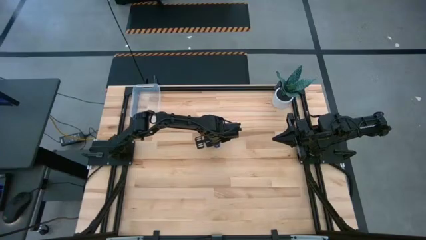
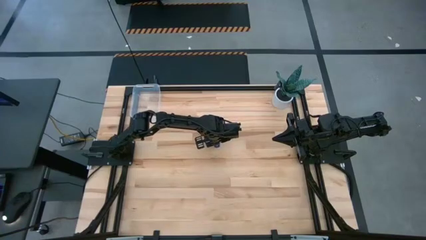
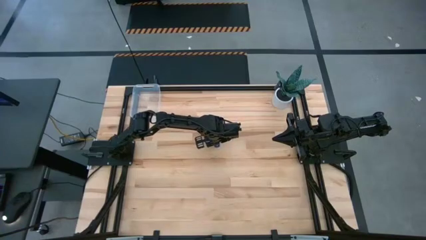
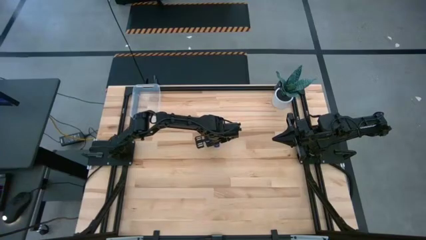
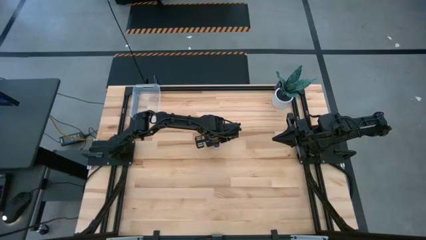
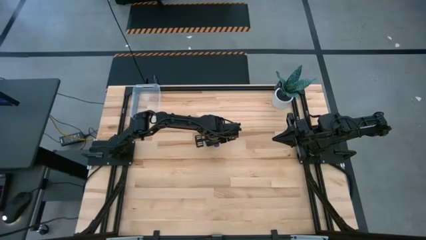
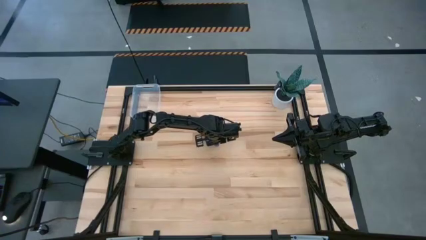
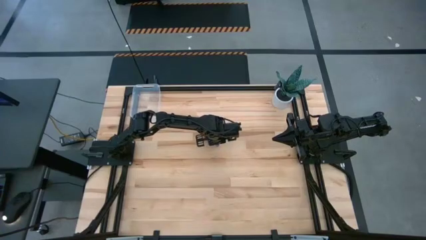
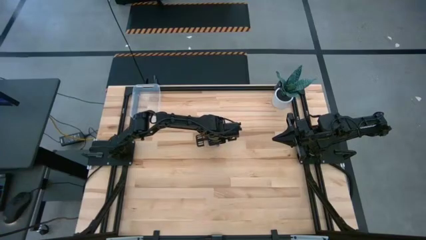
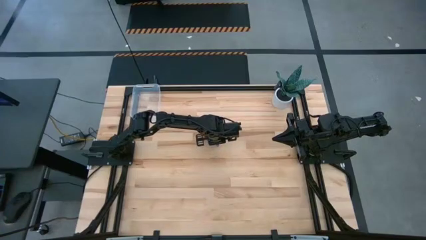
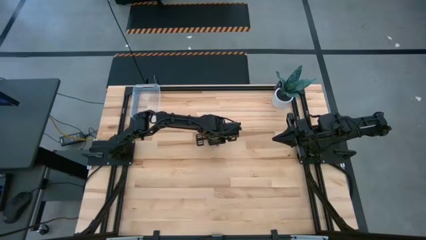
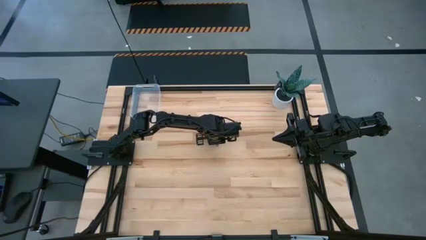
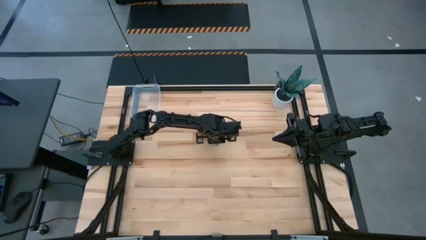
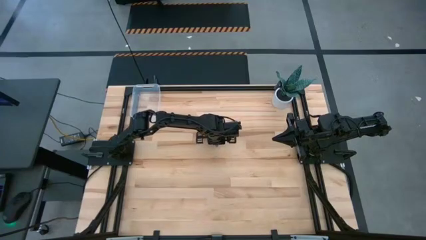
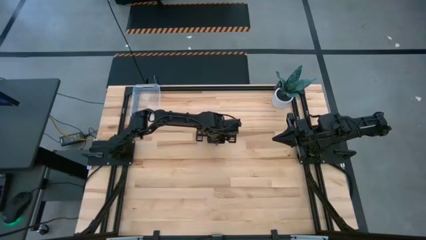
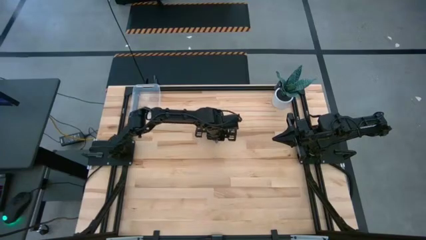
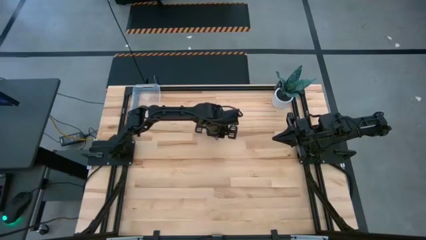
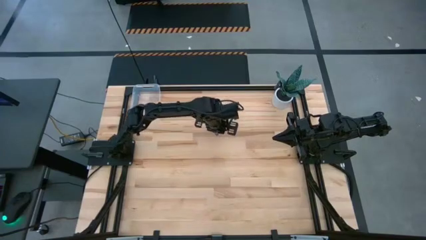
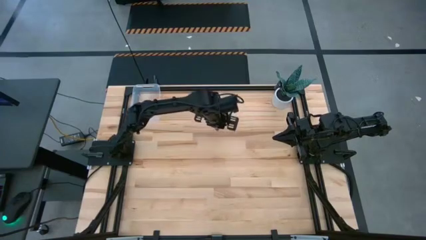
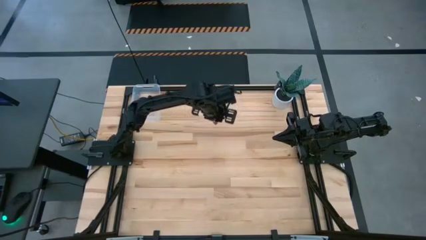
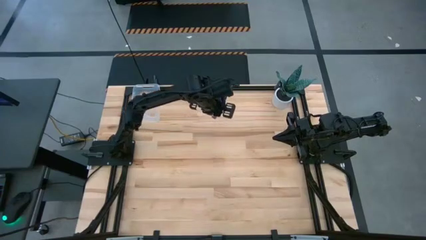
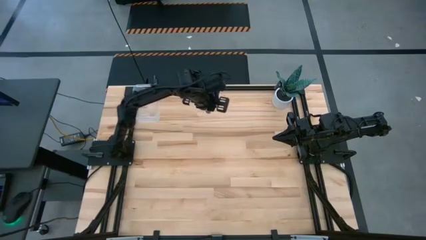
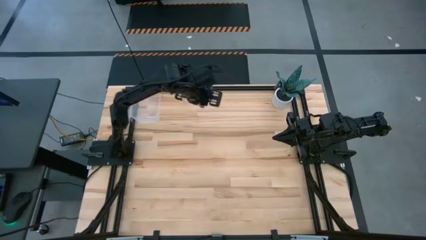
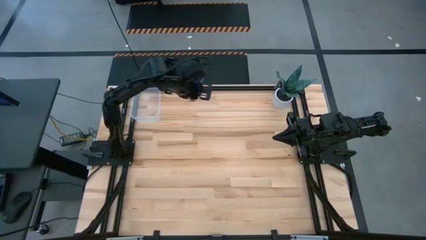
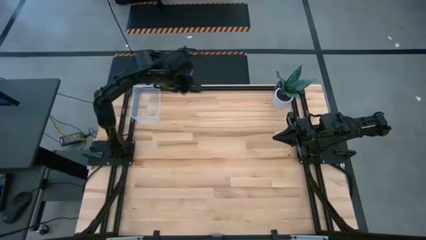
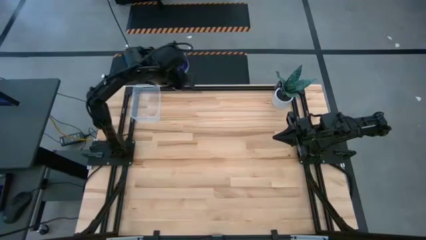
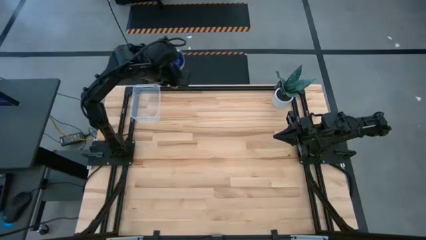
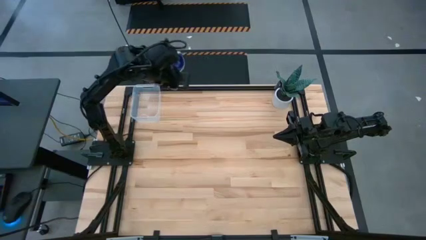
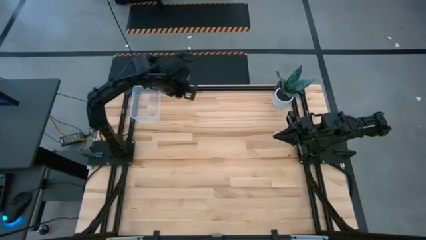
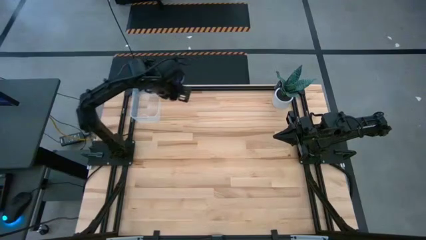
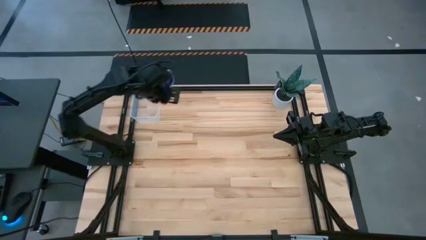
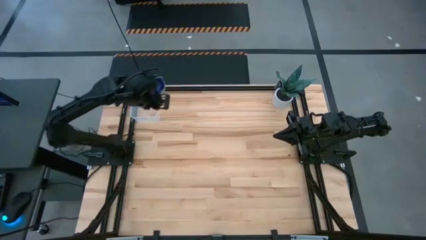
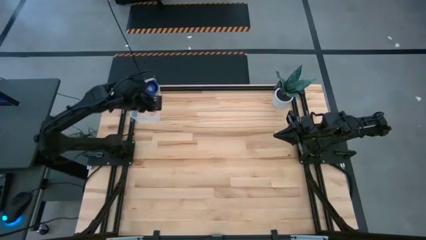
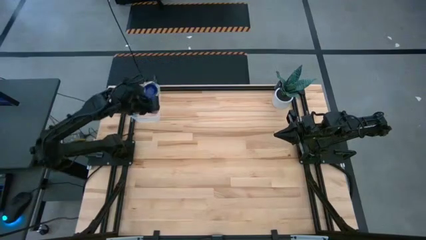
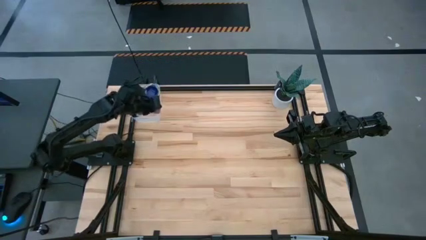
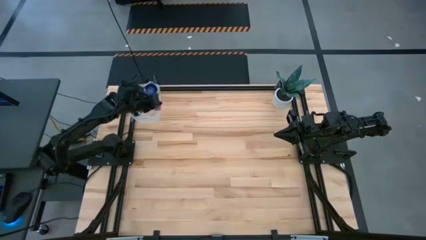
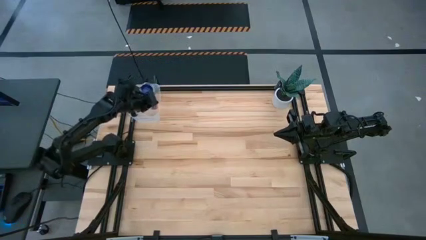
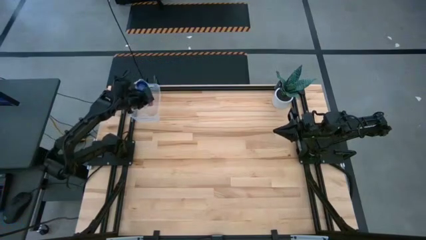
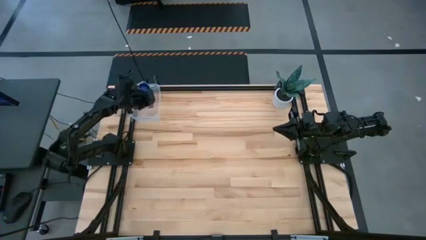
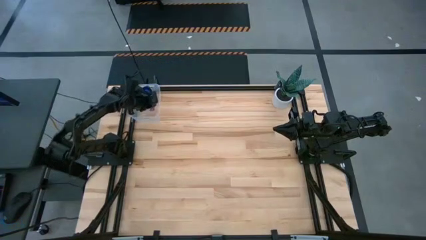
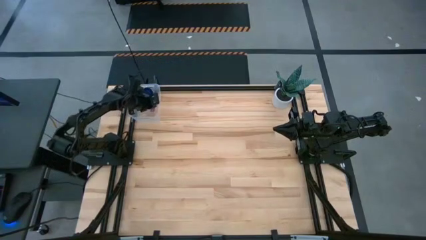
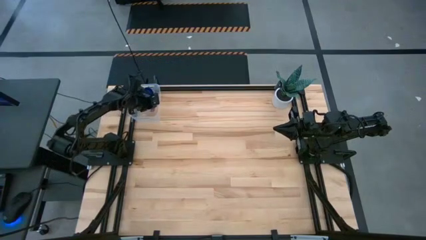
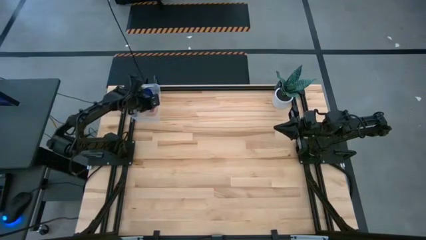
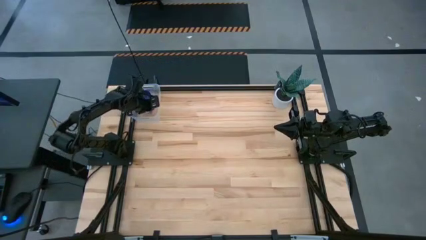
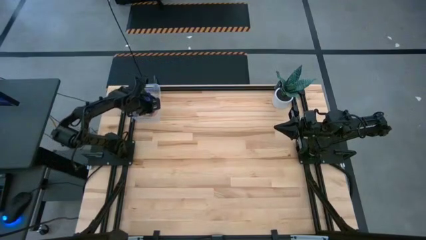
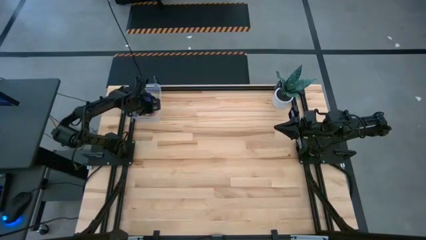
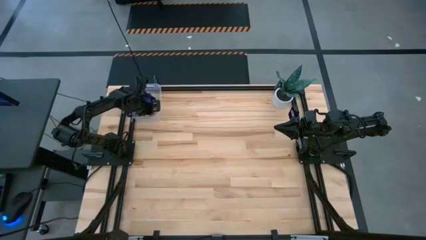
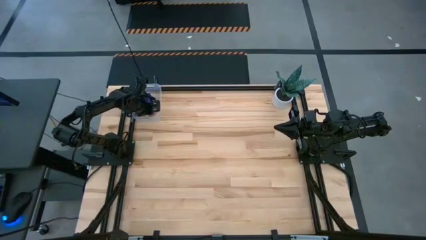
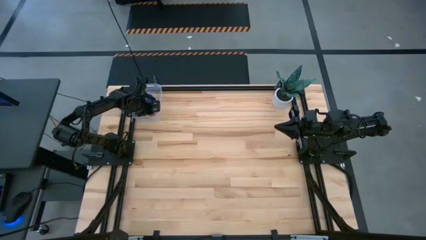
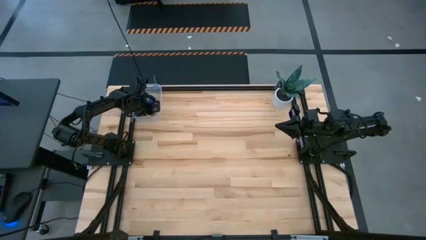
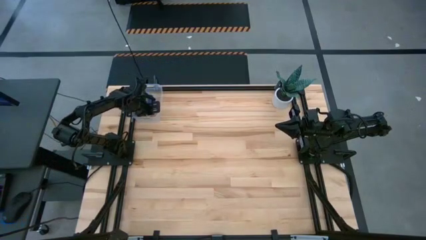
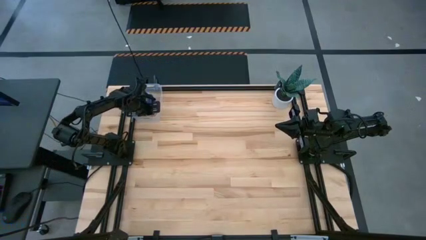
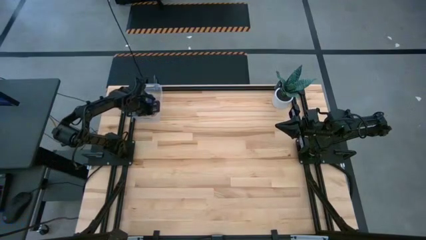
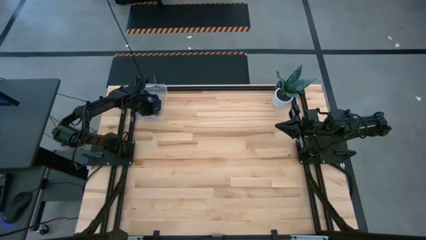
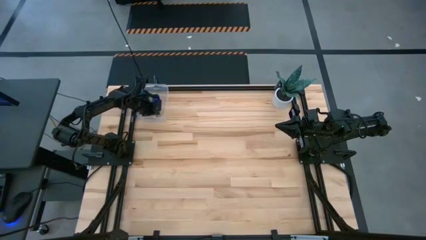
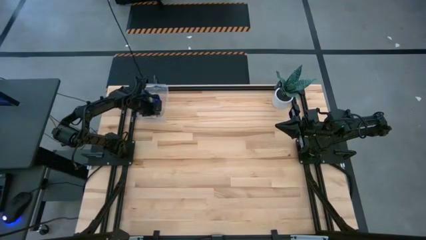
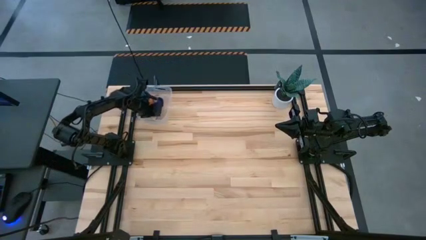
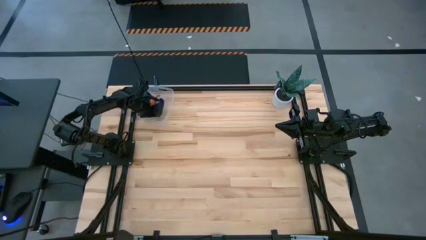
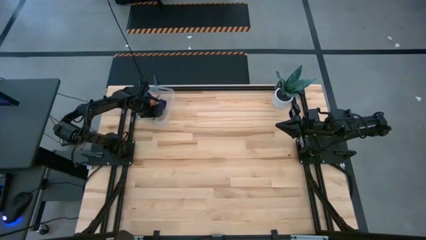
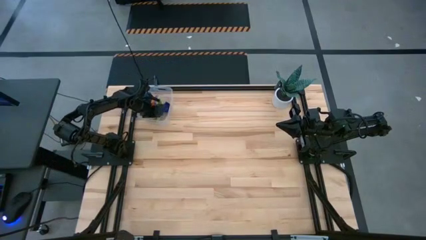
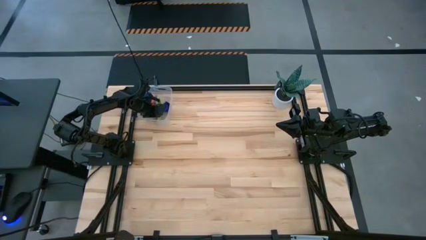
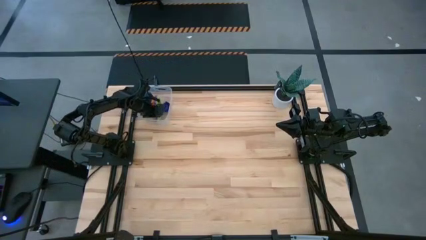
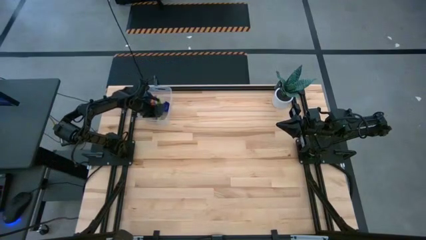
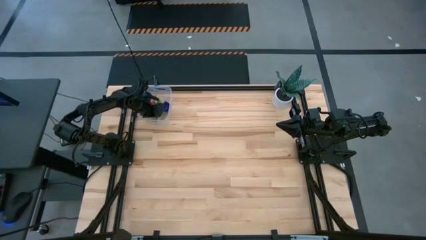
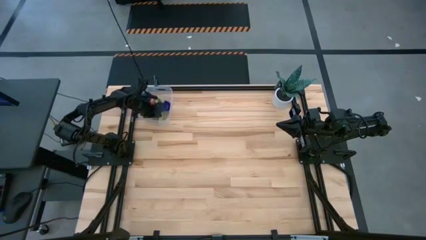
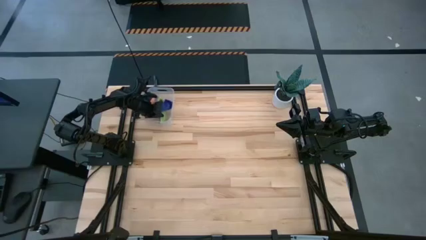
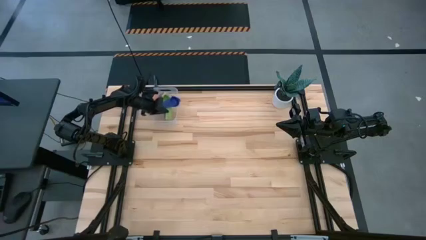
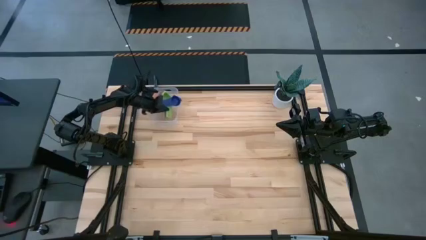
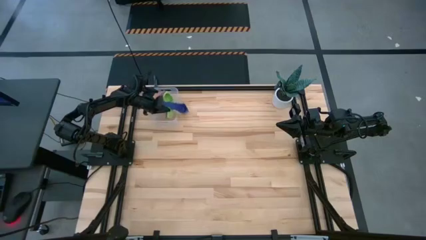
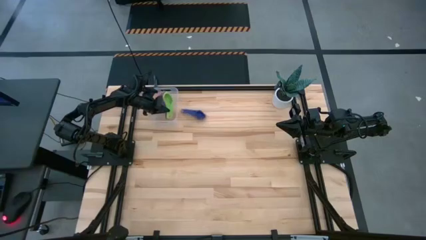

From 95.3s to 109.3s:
Task: Nest measuring cups in basket
Put the measuring cups into the transparent bin

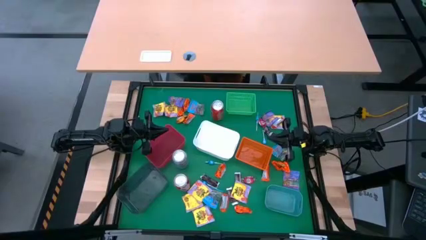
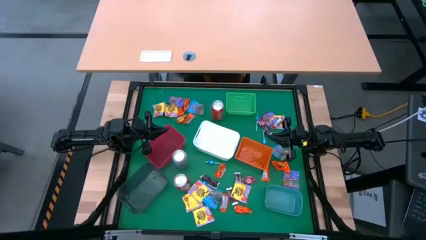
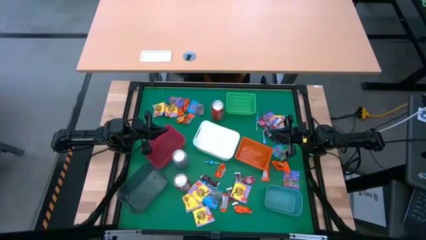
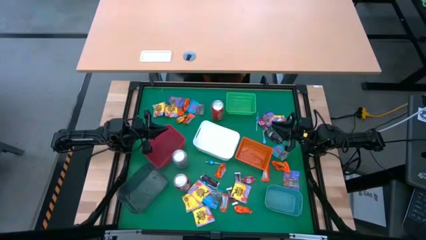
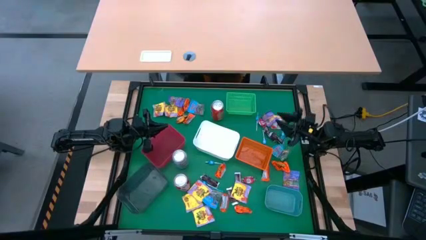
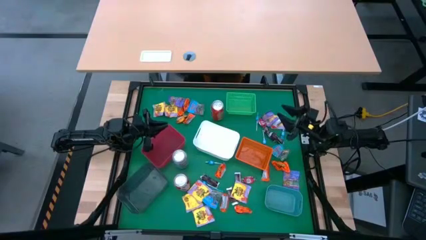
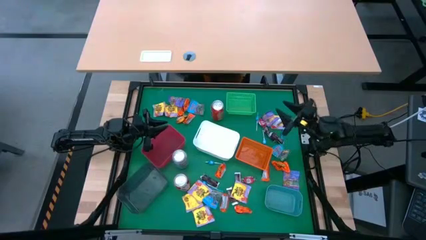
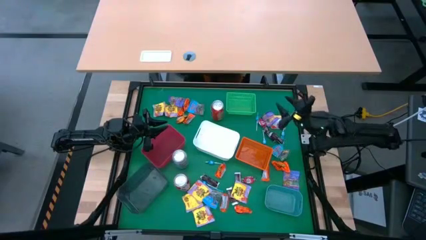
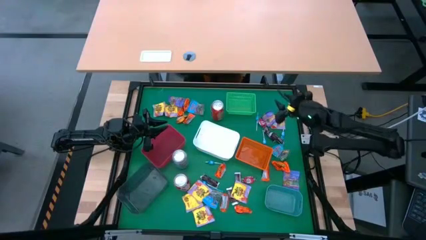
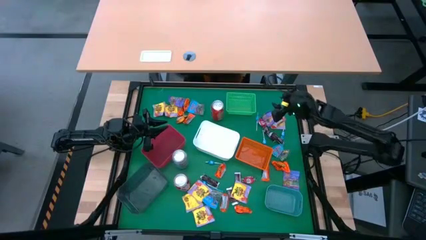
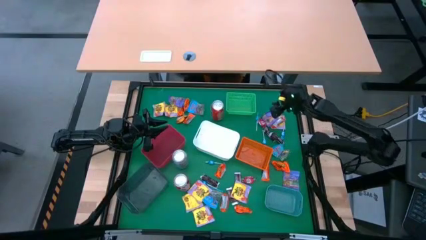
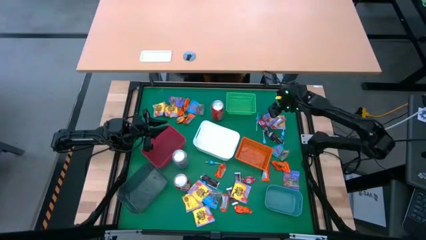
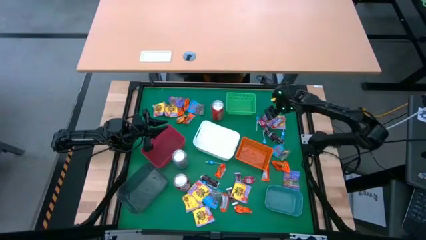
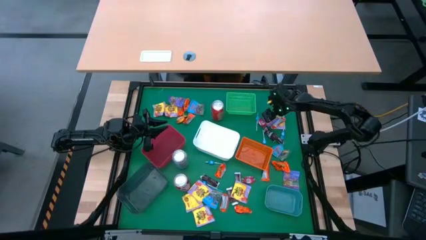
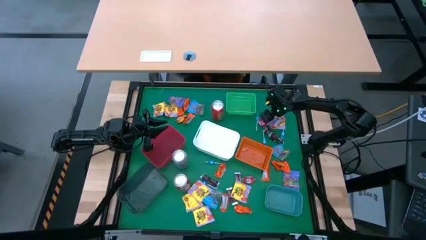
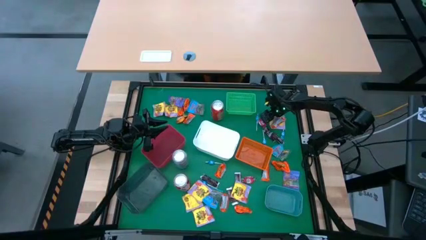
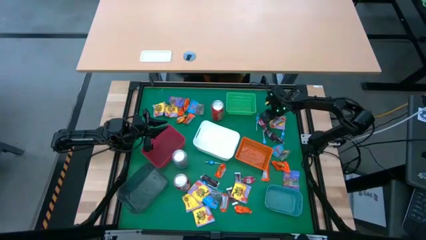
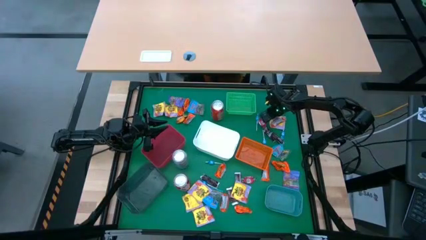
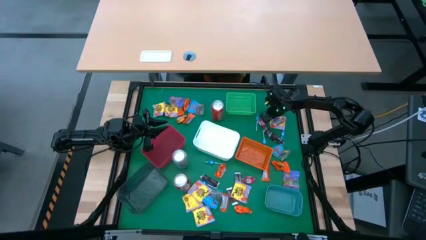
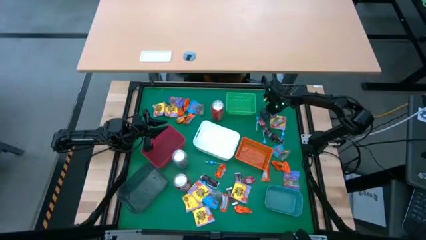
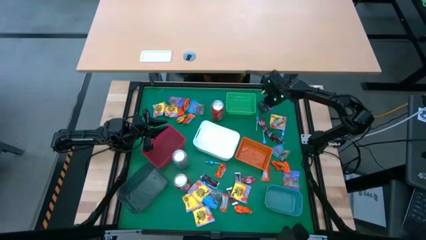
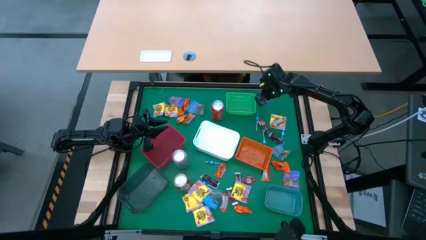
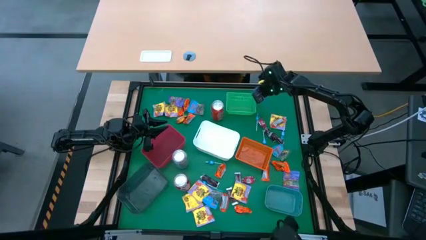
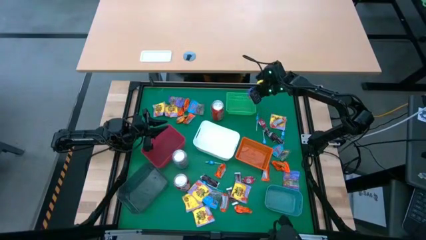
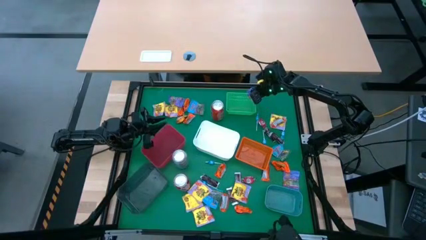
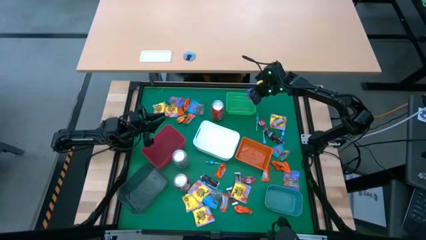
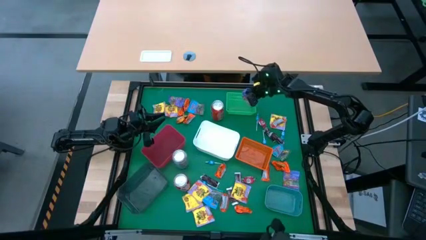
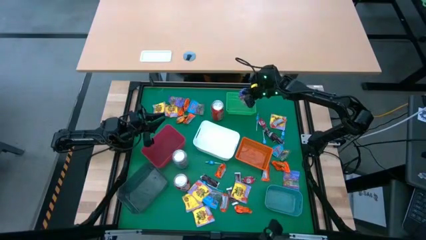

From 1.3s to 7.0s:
Task: Sort candy
Put the violet candy into the green bin
